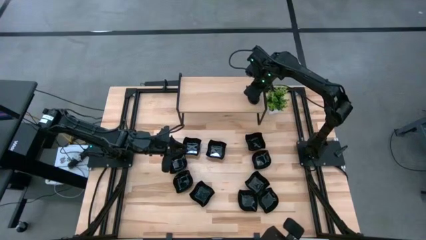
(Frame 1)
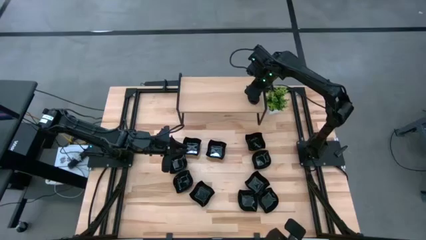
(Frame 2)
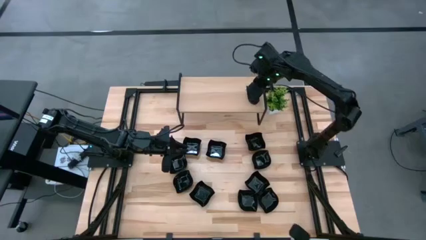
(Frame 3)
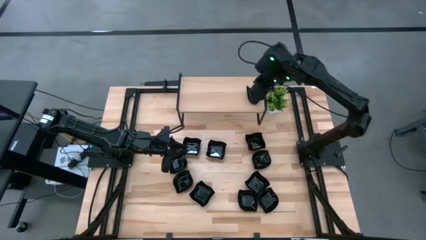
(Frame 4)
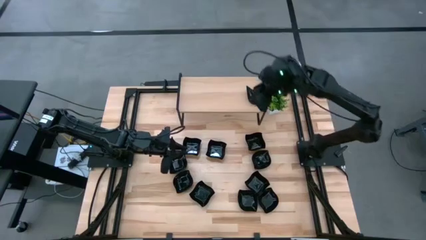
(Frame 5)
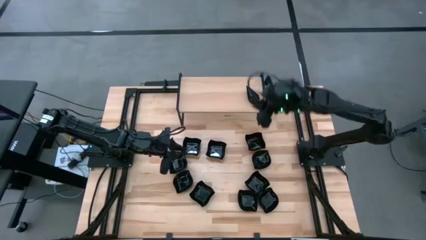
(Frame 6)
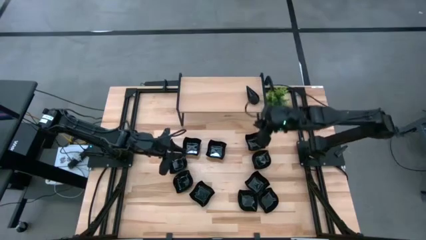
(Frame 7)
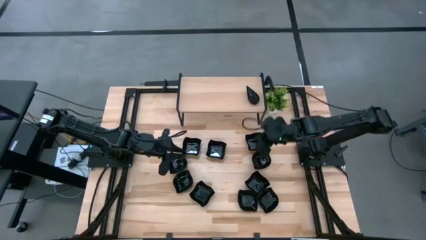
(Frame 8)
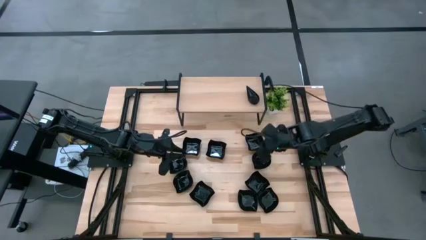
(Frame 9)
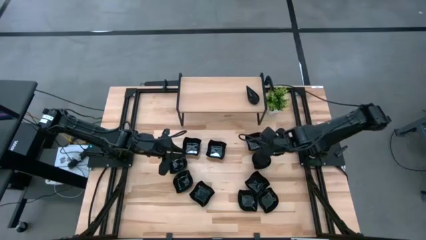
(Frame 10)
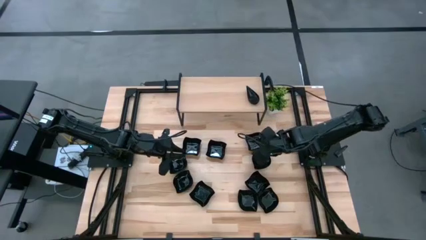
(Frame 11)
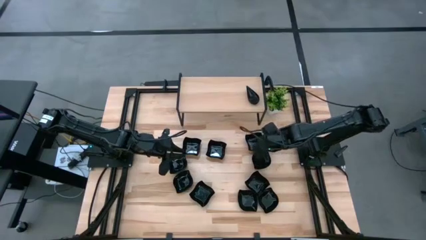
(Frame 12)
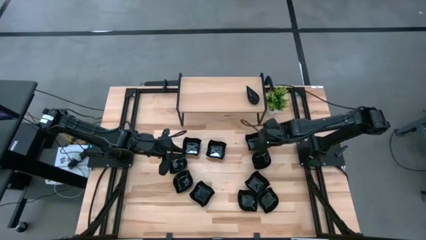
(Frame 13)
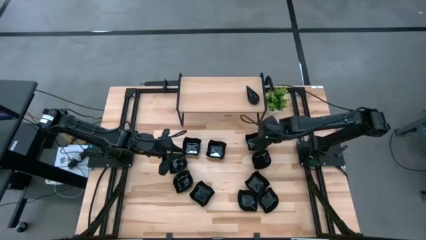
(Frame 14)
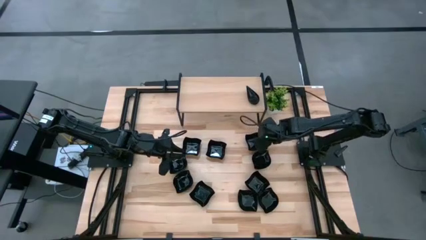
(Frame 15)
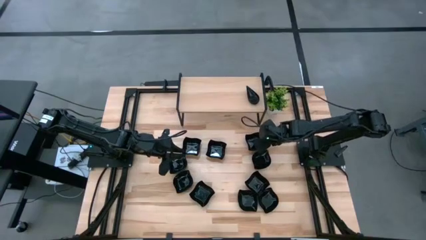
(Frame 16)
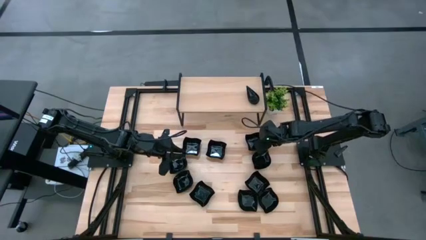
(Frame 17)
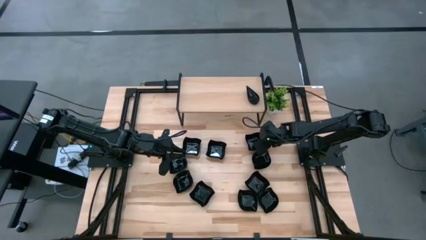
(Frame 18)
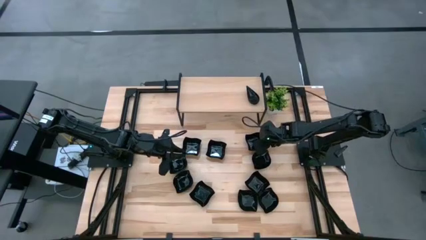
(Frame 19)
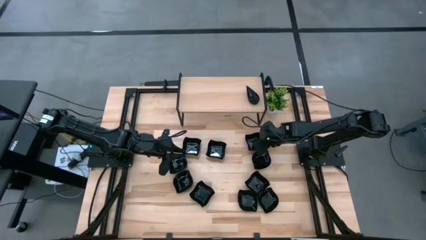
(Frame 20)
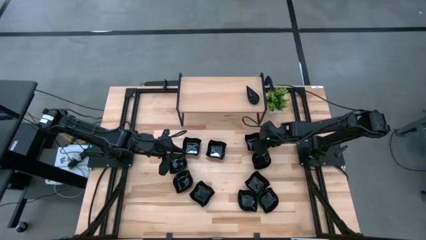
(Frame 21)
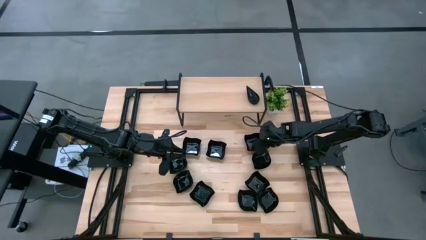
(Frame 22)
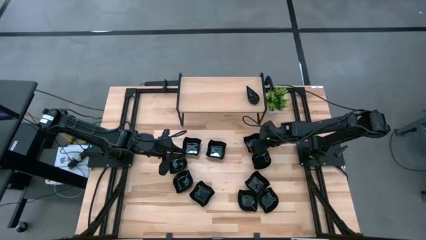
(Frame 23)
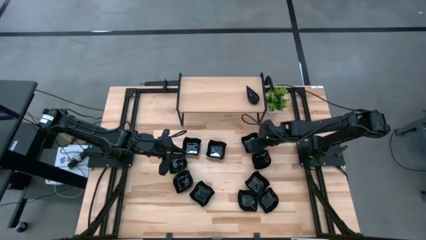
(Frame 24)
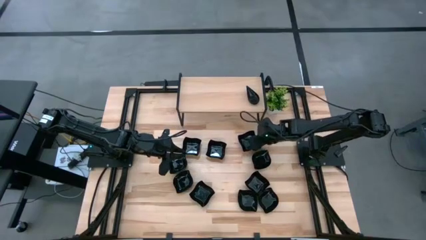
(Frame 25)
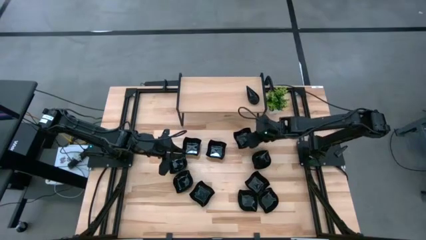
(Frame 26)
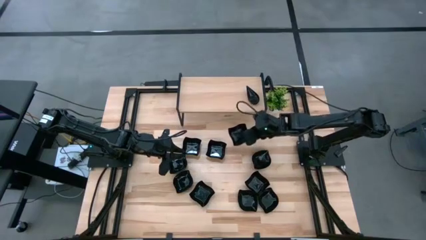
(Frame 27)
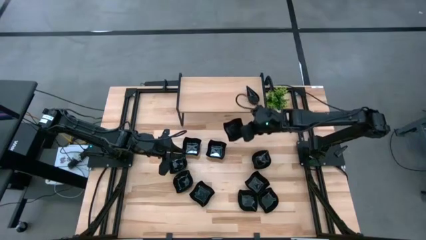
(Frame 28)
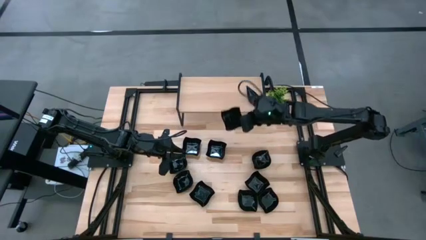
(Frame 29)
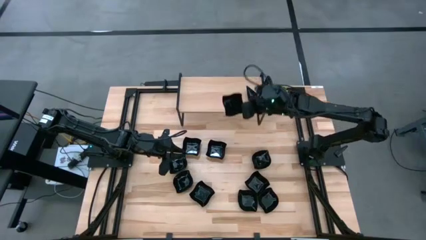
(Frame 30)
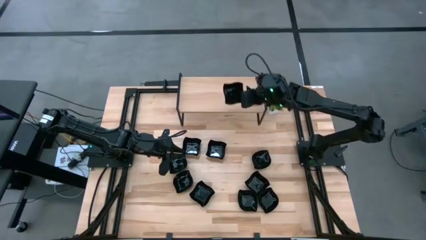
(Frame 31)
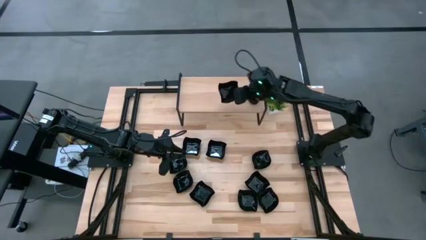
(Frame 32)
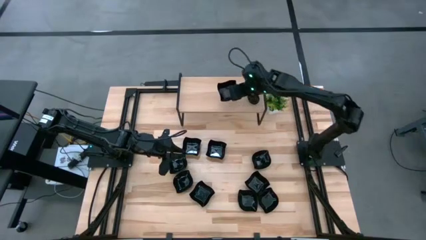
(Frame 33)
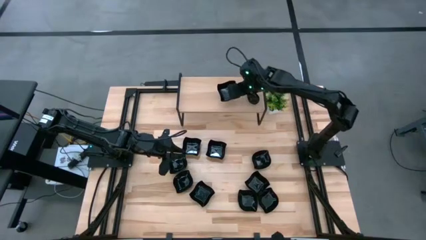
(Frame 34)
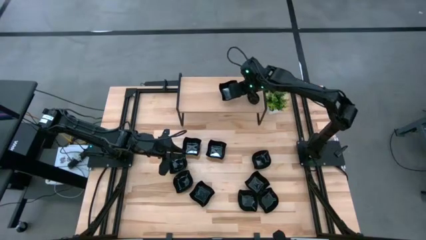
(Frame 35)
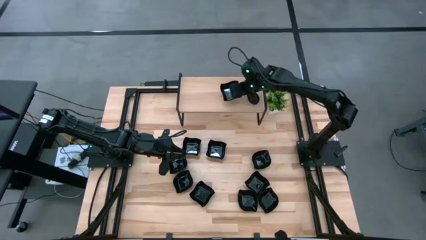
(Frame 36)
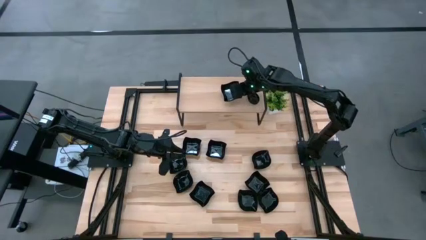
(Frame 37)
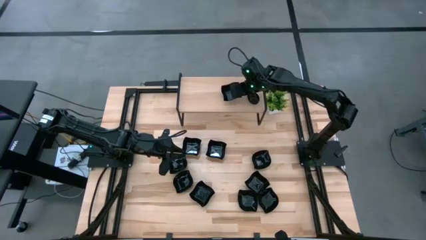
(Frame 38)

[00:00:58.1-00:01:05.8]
Task: Pick & Place Mini shaped plates
Put the black distorted square plate on the shelf

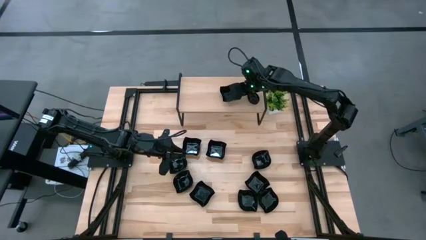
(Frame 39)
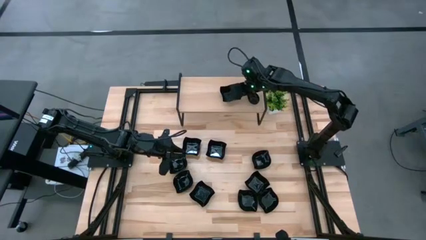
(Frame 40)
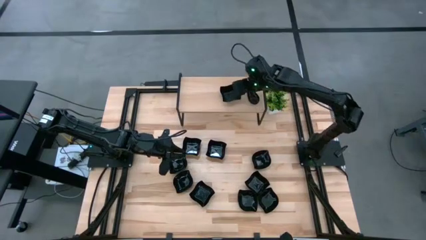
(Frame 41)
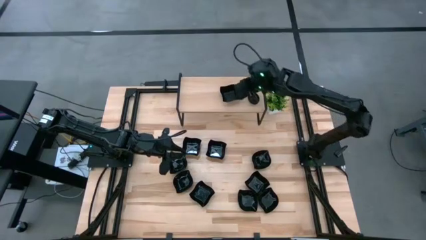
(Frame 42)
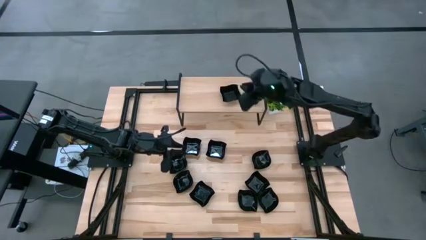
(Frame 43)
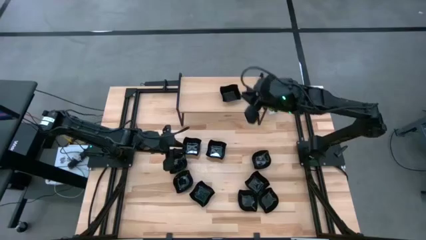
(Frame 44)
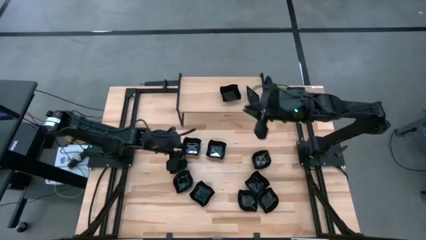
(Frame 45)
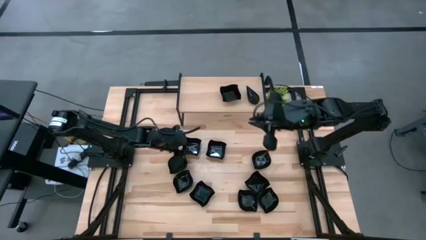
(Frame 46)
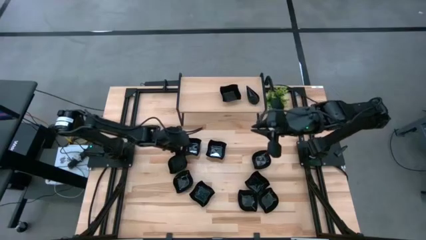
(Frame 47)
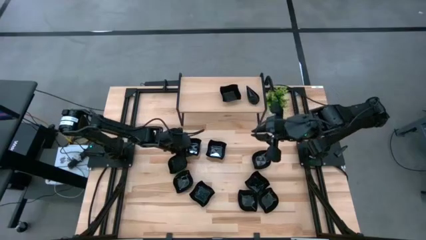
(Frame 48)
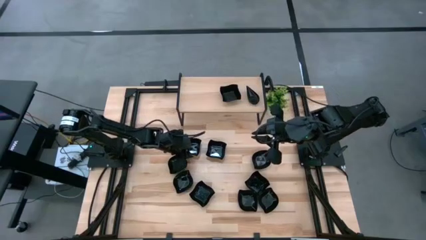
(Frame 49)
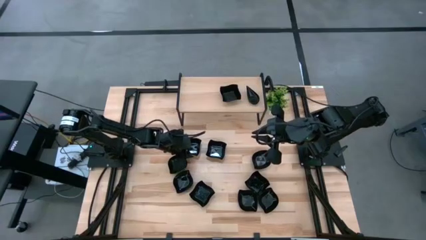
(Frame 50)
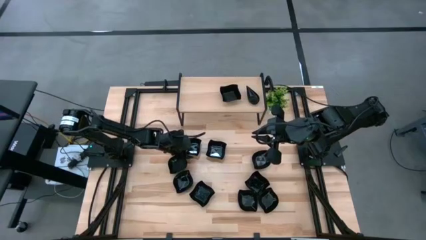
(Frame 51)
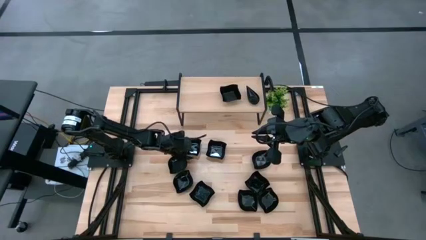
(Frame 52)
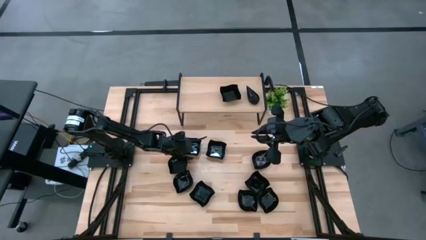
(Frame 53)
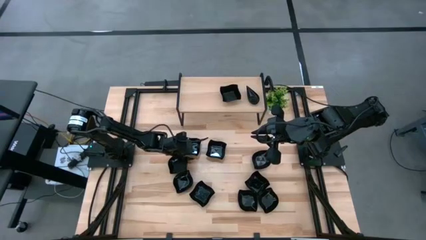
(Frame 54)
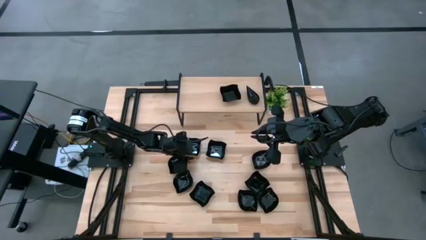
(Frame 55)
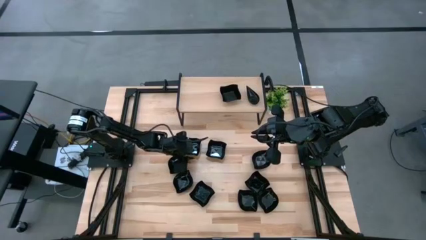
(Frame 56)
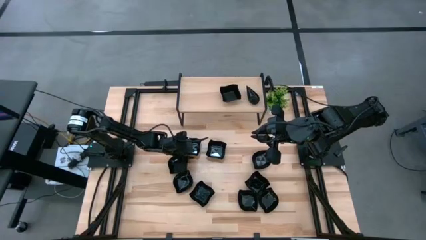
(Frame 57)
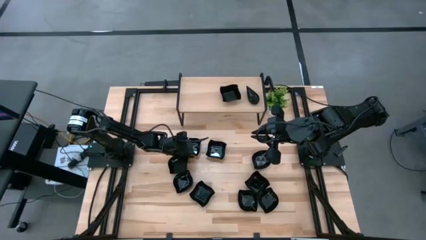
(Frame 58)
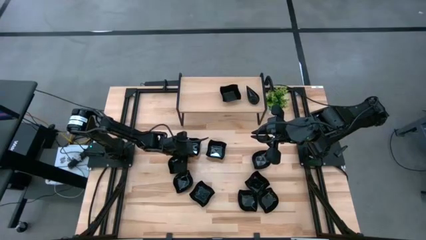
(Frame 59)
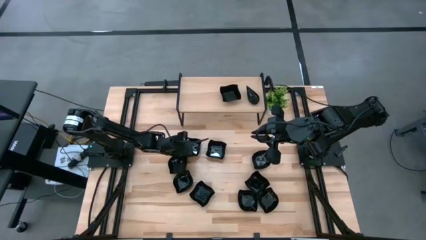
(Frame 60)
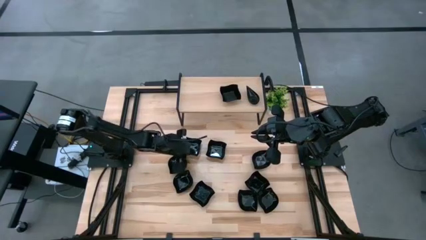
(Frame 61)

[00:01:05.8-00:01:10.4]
Stack the black distorted square plate on top of the black distorted square plate on the shelf
